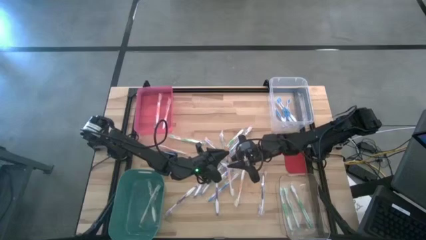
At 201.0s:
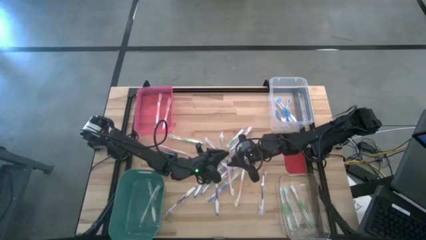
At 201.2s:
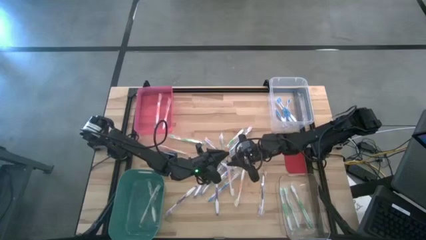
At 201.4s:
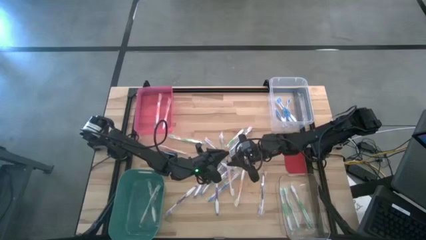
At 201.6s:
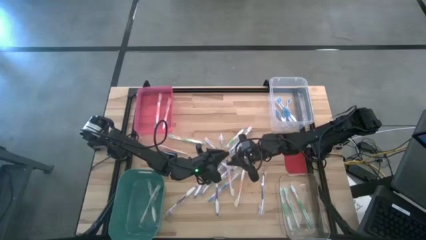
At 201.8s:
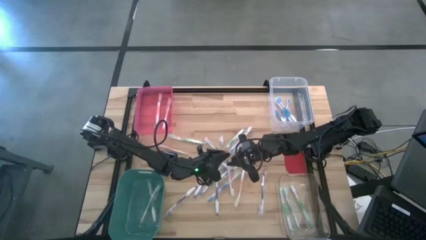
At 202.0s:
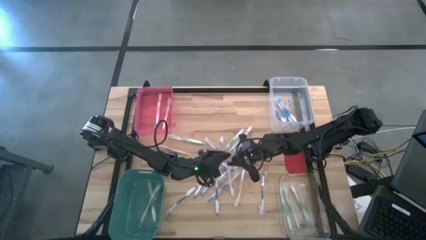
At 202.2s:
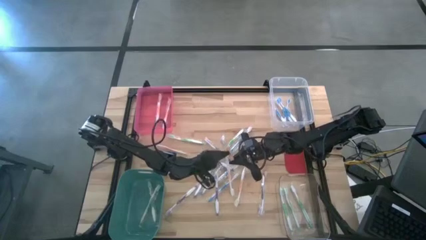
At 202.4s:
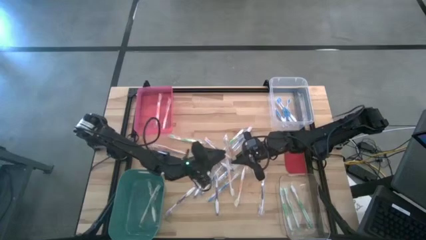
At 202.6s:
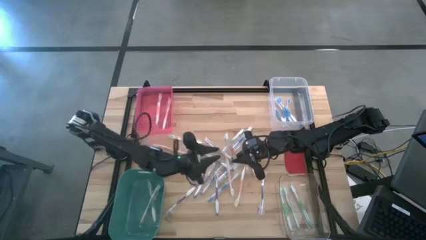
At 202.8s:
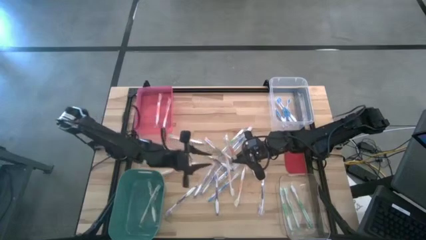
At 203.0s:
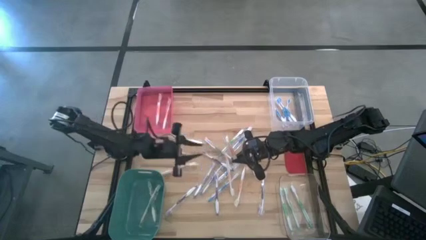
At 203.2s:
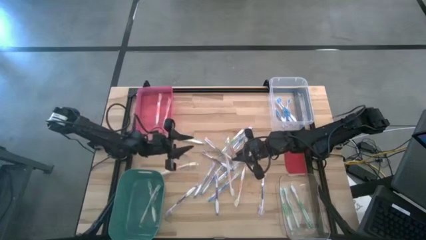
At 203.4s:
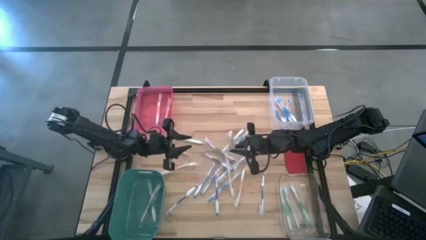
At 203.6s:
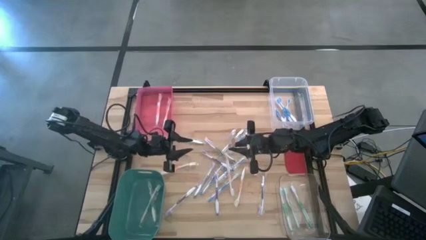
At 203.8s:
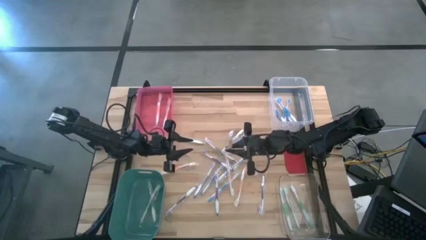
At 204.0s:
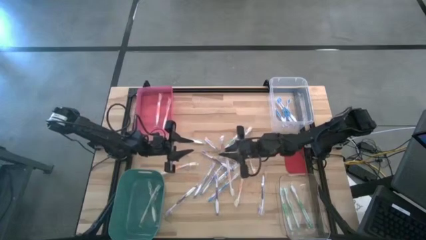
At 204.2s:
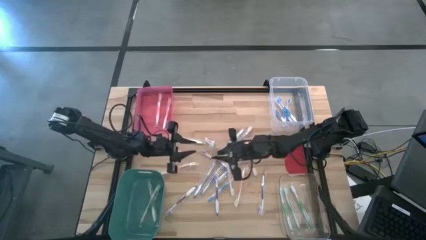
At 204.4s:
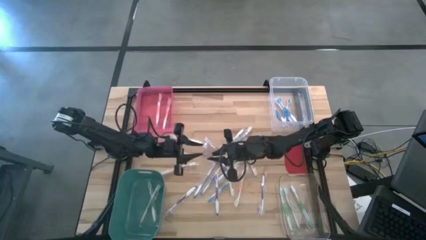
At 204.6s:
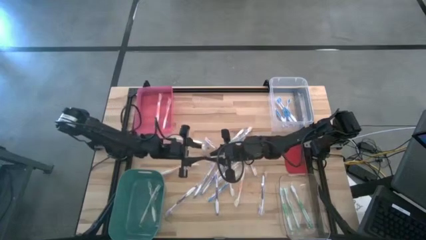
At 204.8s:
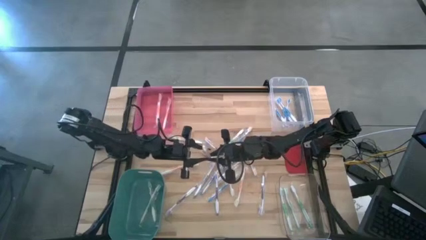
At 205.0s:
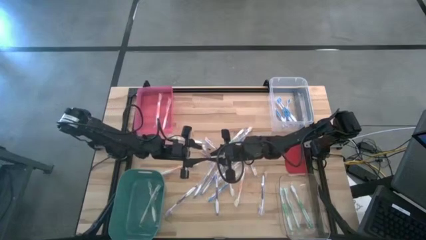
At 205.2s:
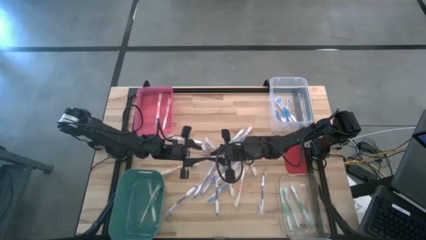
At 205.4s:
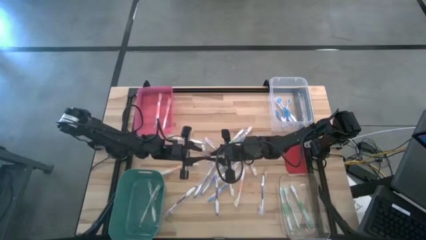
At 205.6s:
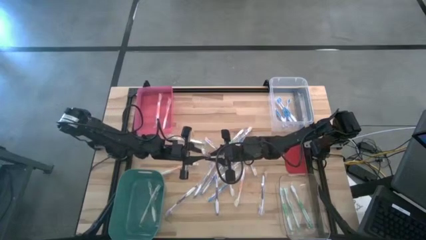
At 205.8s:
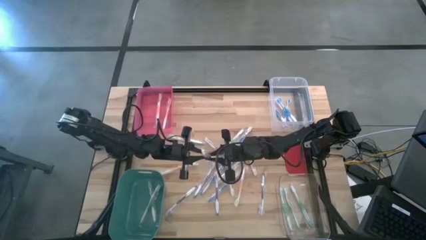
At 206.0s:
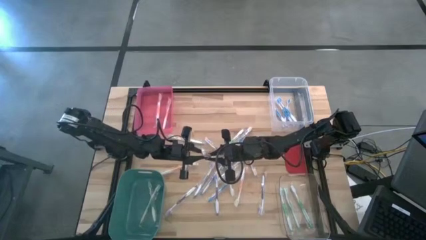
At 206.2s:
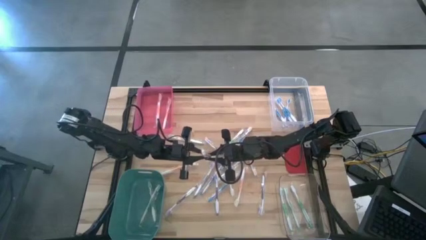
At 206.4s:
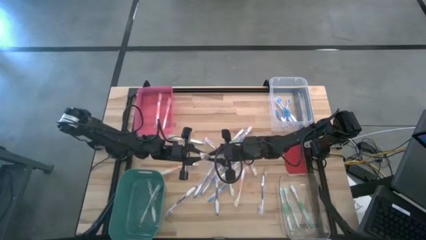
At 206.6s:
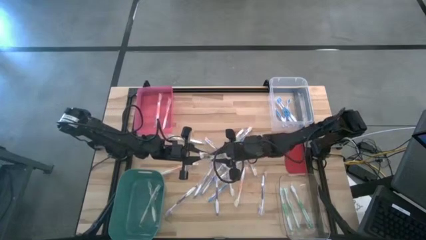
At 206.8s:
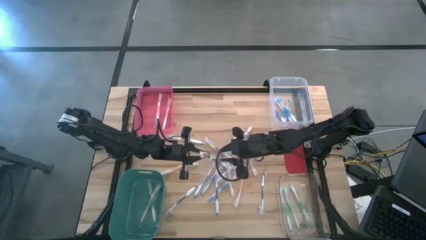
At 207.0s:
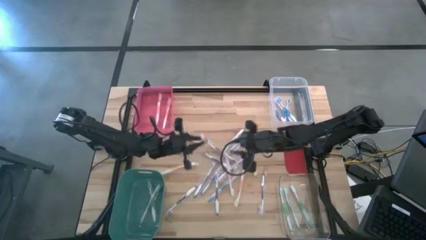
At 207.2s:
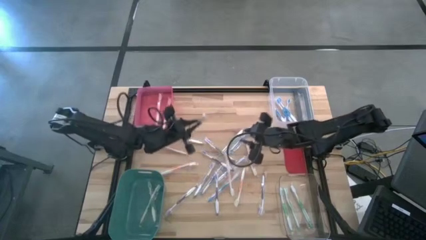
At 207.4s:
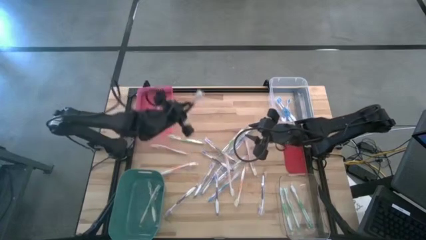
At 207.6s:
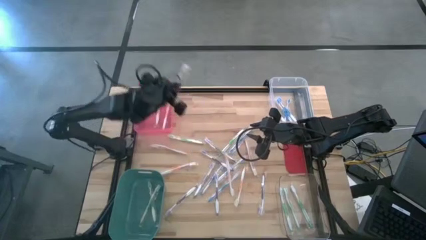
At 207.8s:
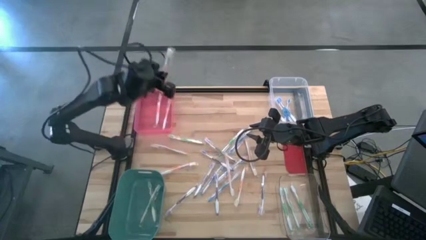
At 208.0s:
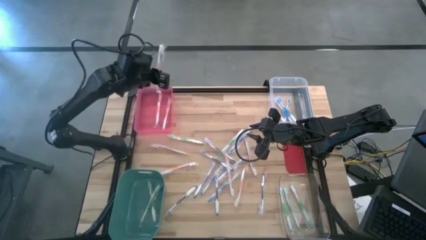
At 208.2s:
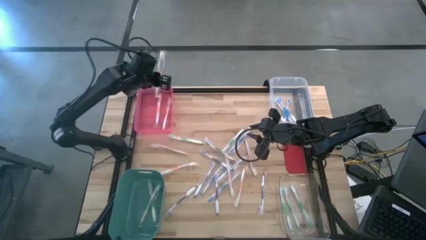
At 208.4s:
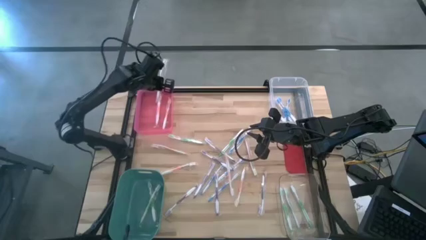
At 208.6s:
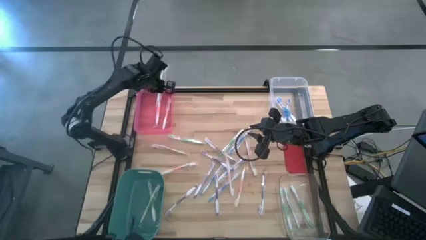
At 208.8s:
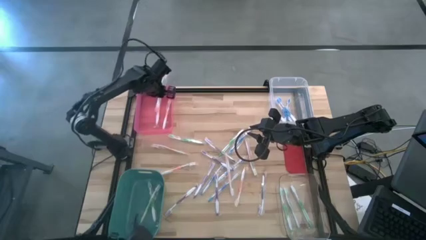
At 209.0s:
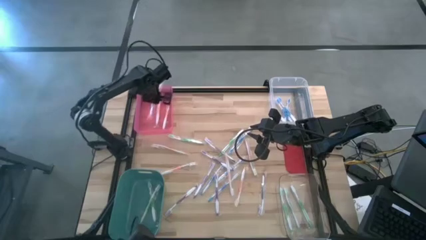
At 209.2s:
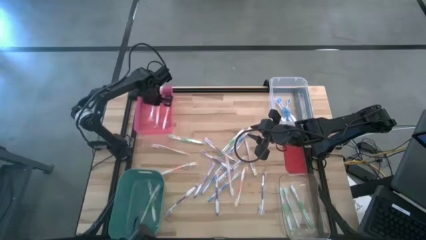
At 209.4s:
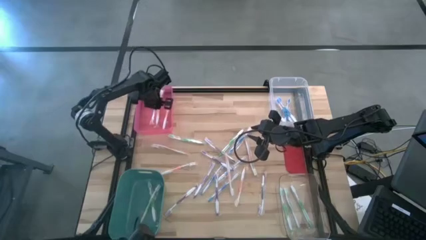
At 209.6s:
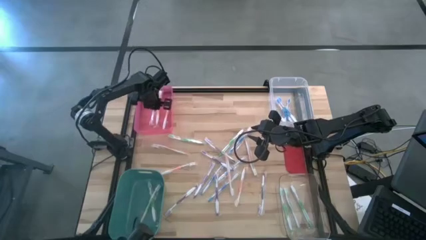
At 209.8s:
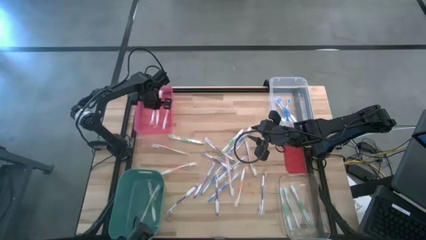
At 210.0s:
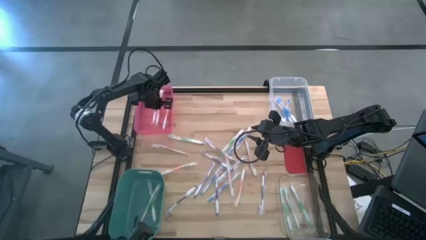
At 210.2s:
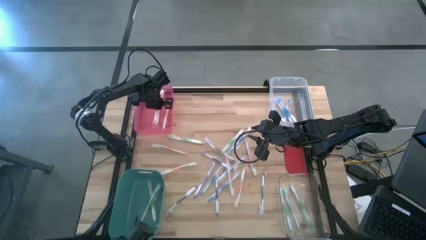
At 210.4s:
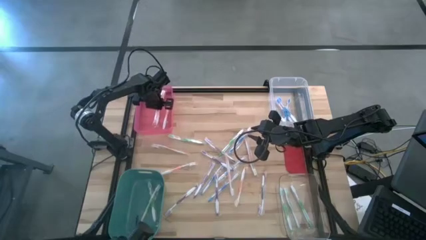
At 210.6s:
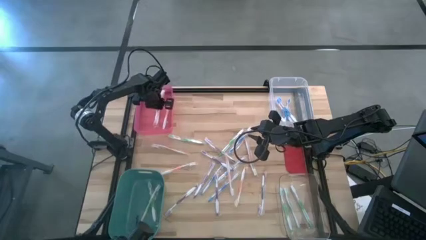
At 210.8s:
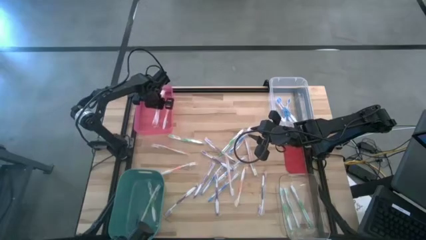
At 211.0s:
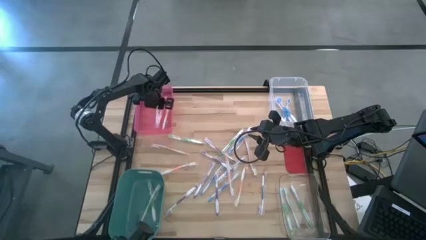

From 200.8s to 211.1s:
Task: Pick & Place Toothbrushes
Put the orange toothbrush into the pink bin

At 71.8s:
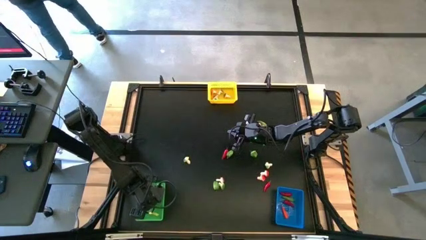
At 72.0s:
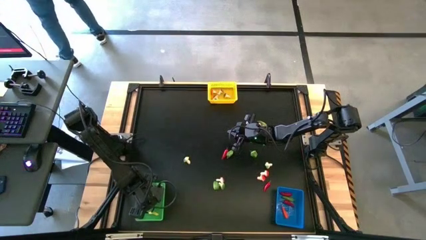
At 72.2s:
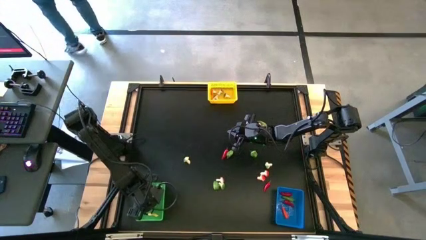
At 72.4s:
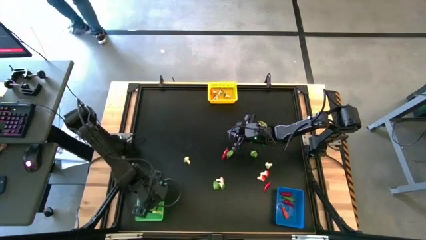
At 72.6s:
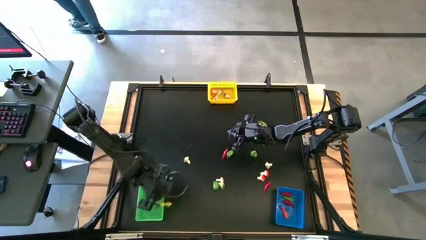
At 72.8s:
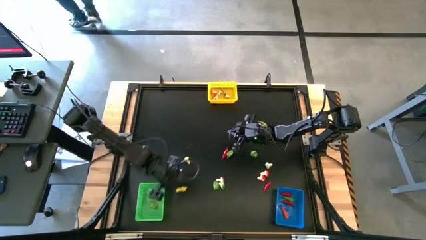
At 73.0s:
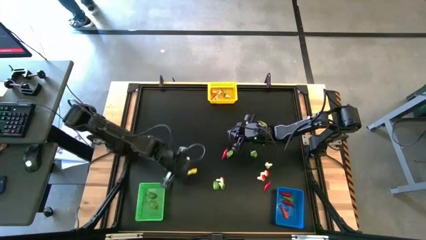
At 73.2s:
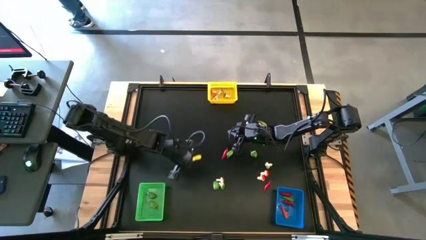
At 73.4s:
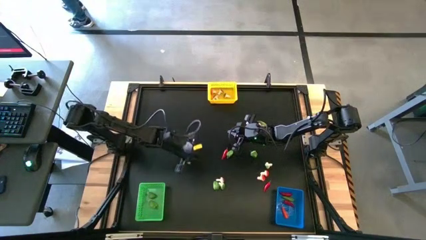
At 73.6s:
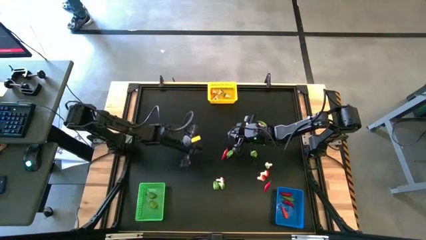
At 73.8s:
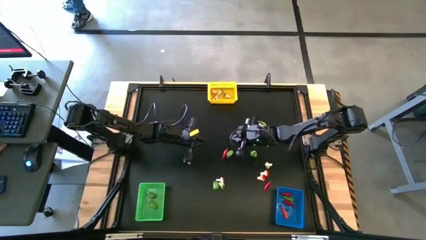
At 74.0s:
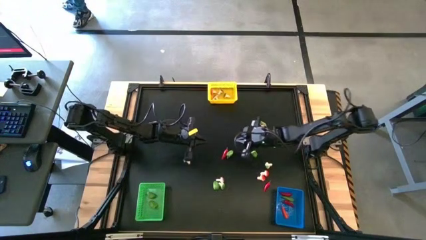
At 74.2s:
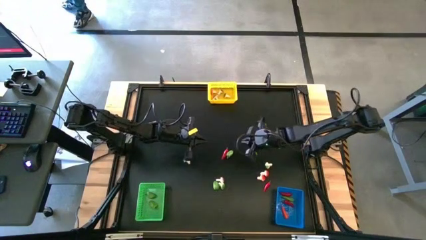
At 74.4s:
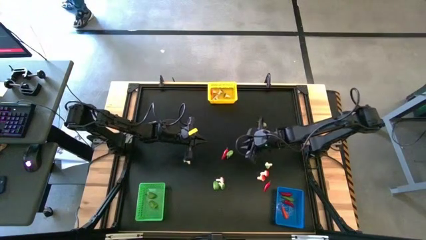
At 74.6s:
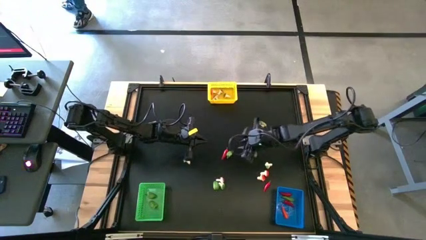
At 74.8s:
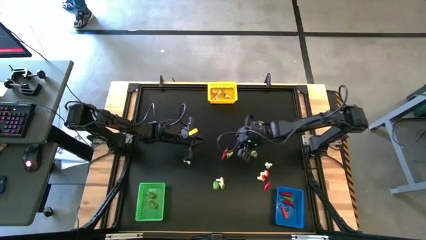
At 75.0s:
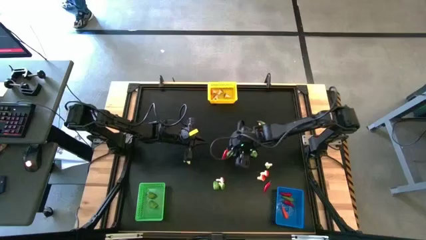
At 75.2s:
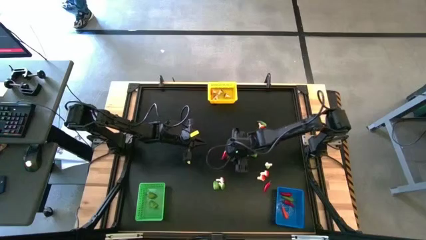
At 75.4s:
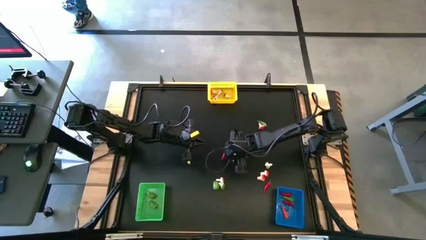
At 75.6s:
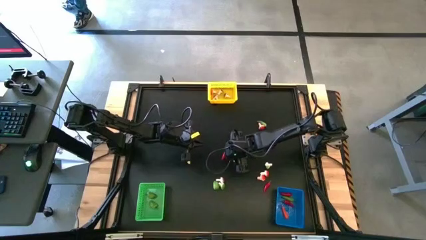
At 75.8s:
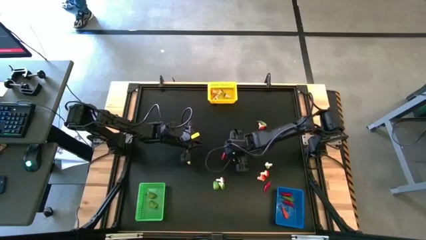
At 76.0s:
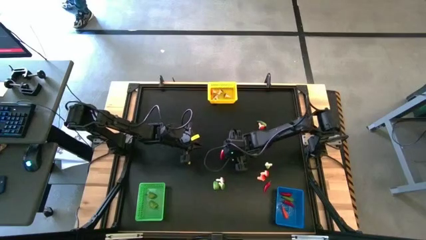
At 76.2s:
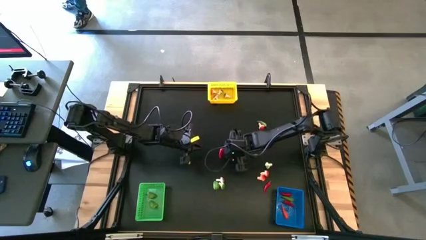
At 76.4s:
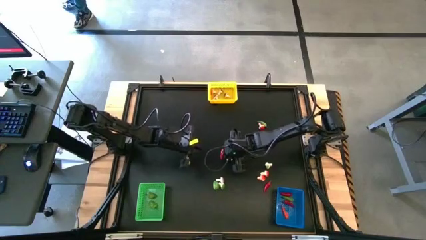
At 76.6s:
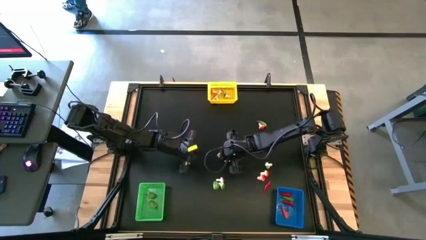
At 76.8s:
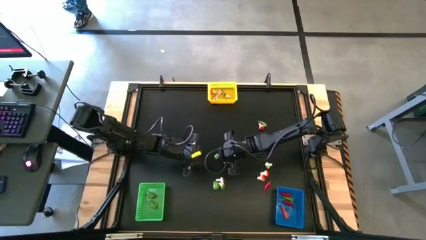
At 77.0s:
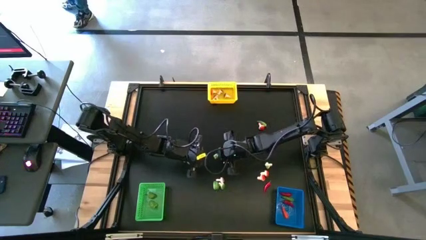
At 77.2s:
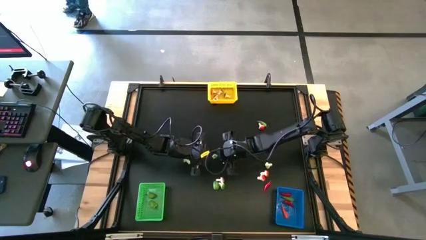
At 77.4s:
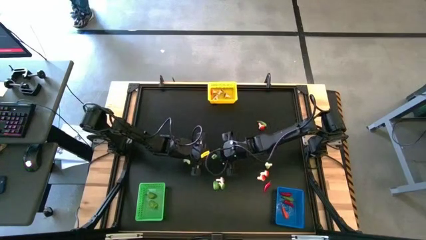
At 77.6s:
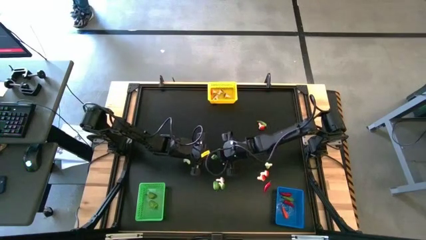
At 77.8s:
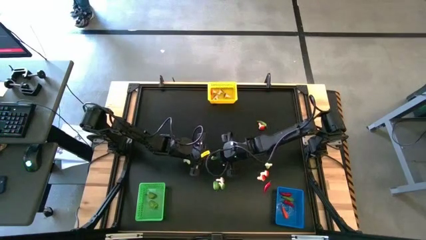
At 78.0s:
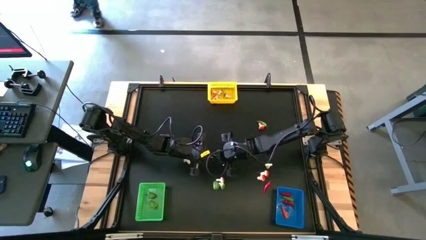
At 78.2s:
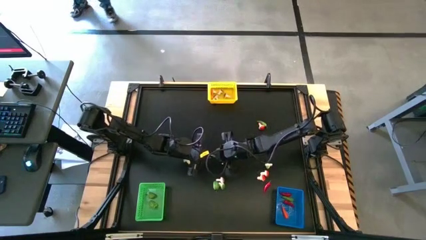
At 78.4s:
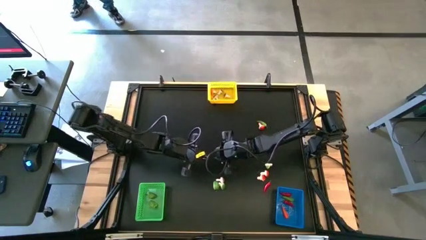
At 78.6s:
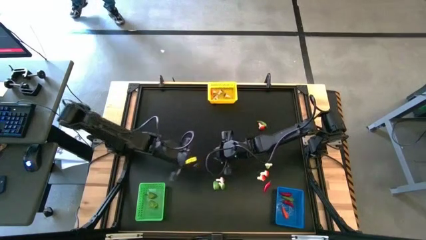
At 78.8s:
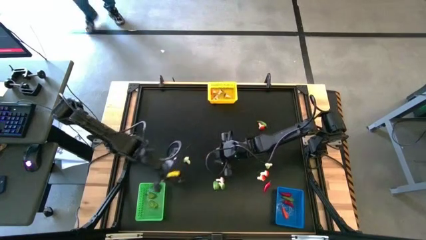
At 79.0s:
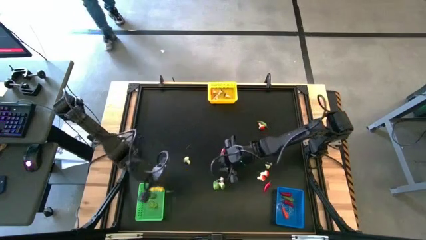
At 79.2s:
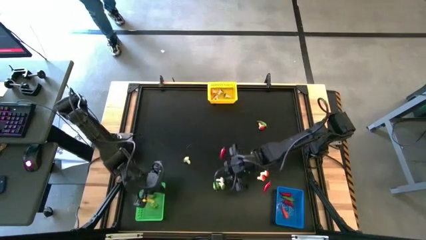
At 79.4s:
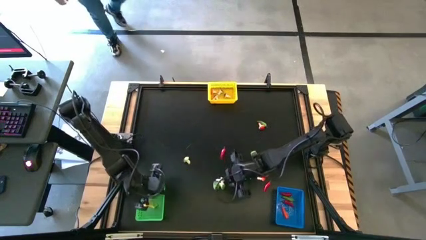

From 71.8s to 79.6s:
Task: Sort produce into baskets
Put the middle left green pepper into the green bin

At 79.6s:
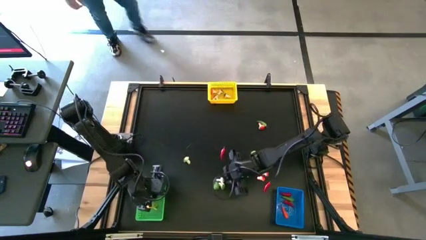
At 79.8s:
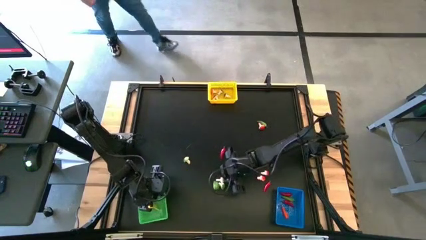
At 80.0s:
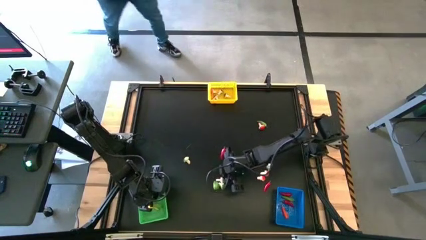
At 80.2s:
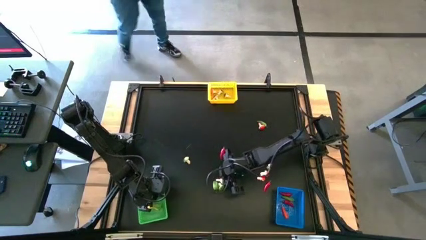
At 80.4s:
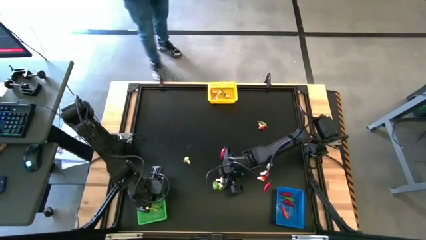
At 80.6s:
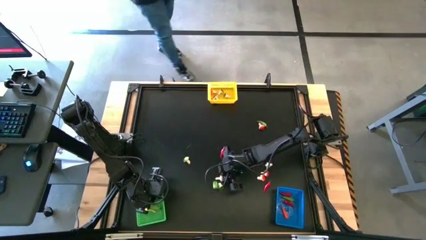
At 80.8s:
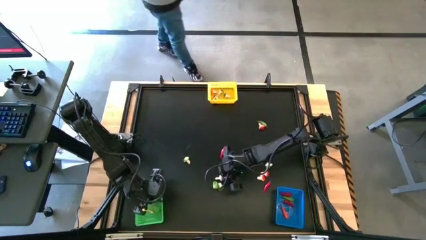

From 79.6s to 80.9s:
Put the center brown mushroom into the yellow bin
